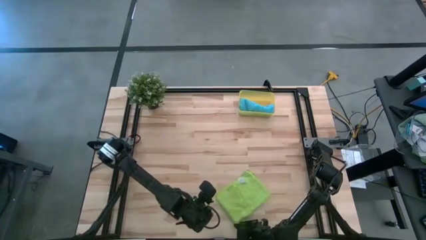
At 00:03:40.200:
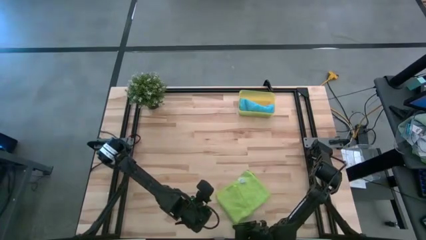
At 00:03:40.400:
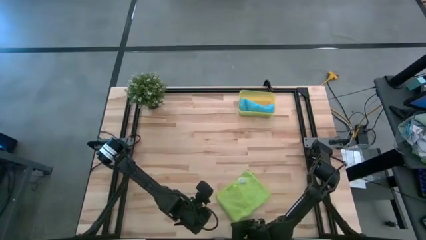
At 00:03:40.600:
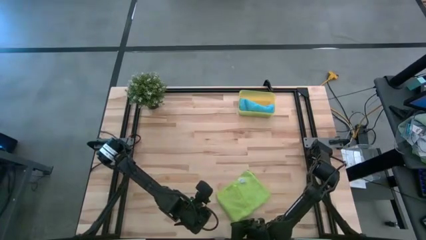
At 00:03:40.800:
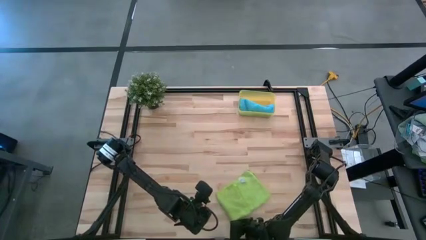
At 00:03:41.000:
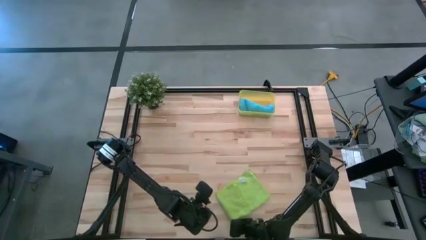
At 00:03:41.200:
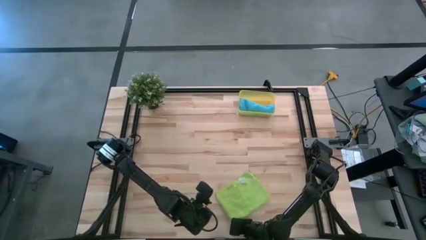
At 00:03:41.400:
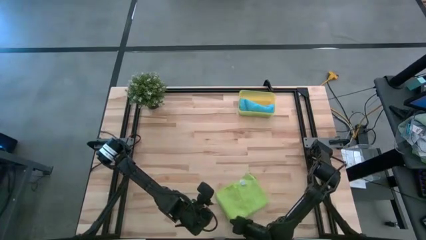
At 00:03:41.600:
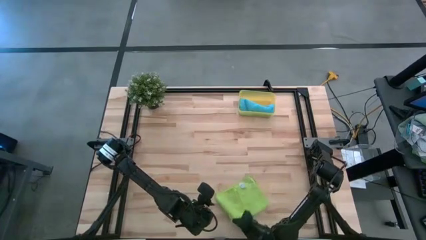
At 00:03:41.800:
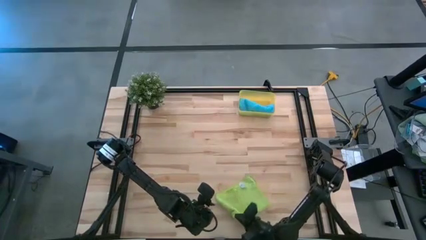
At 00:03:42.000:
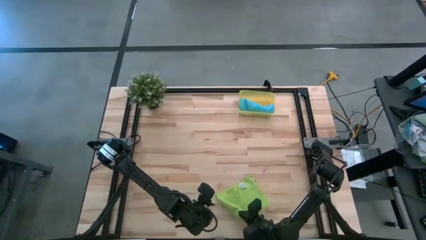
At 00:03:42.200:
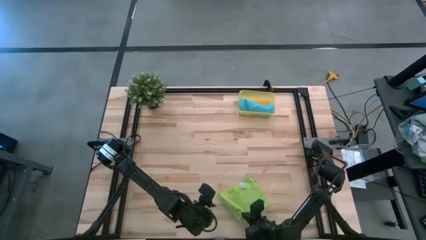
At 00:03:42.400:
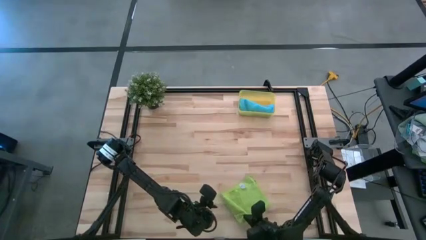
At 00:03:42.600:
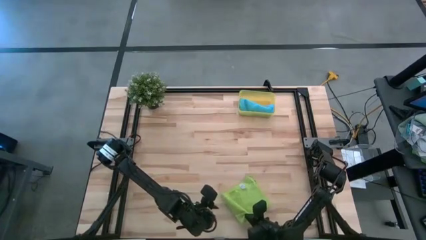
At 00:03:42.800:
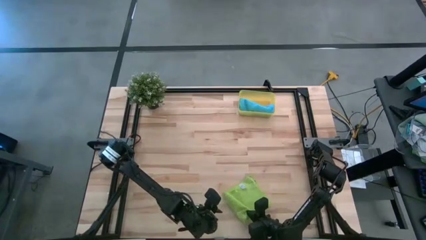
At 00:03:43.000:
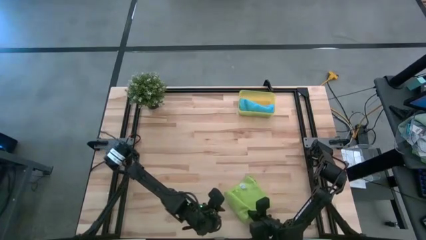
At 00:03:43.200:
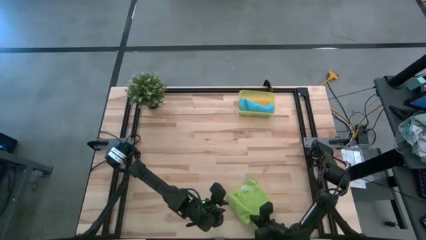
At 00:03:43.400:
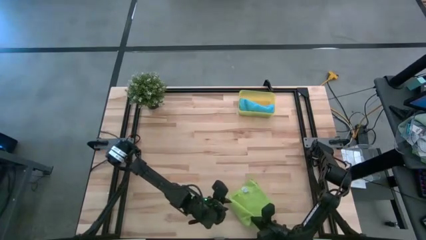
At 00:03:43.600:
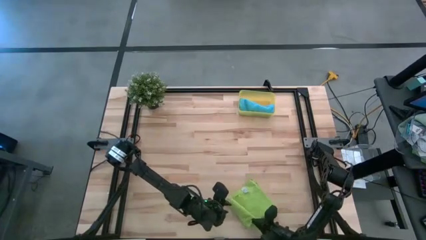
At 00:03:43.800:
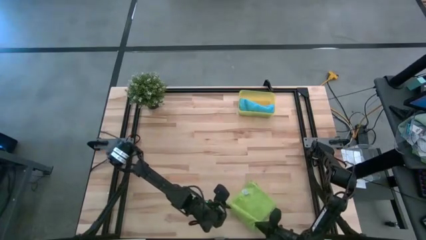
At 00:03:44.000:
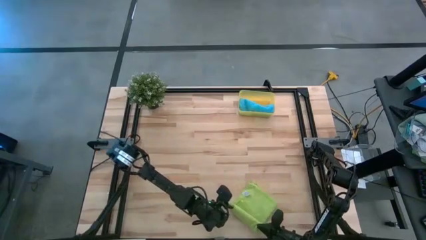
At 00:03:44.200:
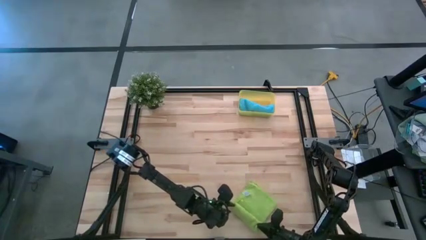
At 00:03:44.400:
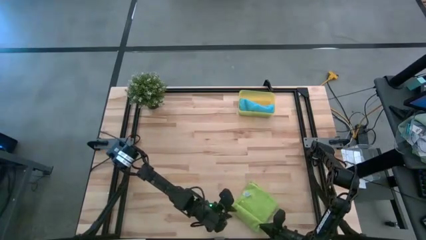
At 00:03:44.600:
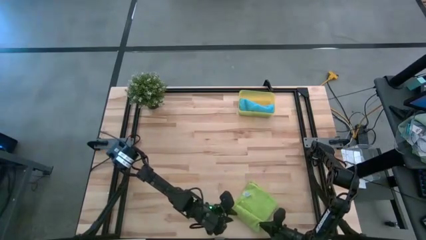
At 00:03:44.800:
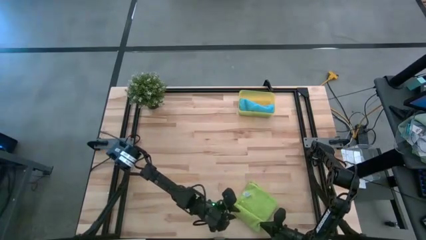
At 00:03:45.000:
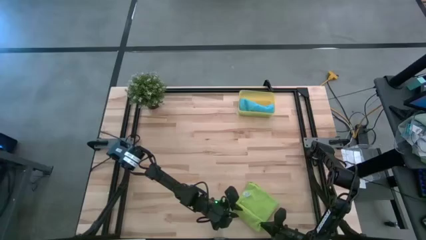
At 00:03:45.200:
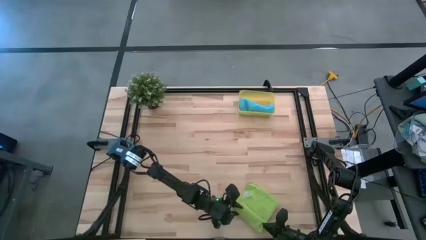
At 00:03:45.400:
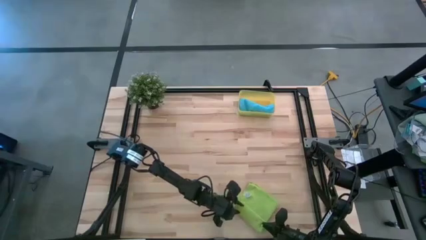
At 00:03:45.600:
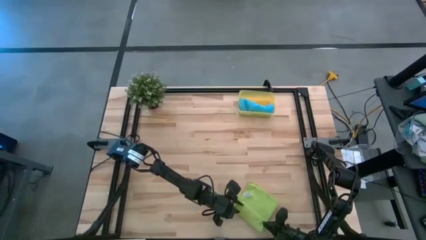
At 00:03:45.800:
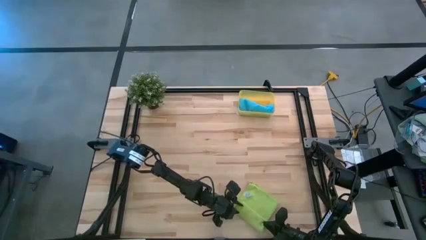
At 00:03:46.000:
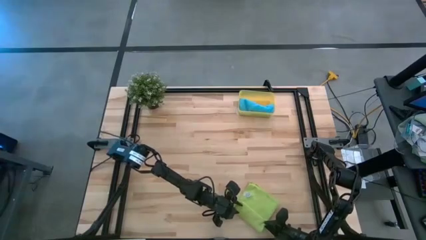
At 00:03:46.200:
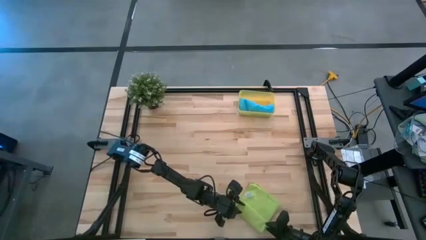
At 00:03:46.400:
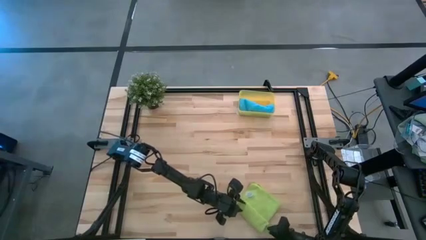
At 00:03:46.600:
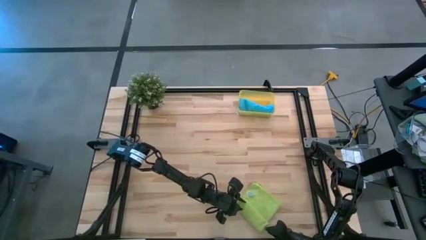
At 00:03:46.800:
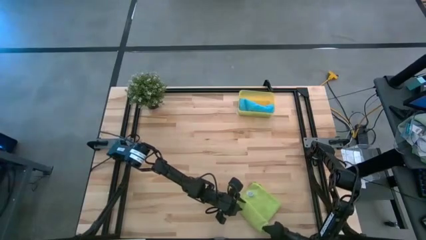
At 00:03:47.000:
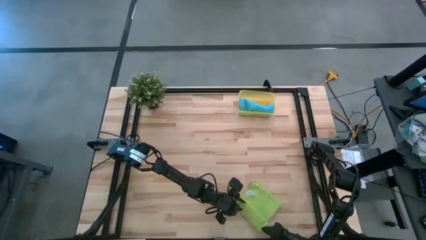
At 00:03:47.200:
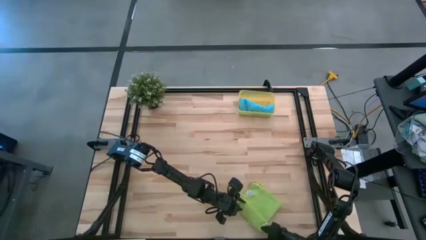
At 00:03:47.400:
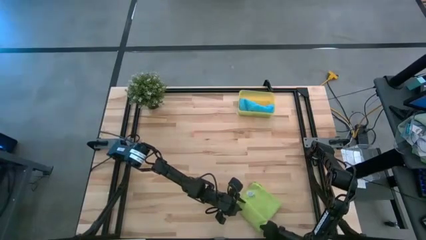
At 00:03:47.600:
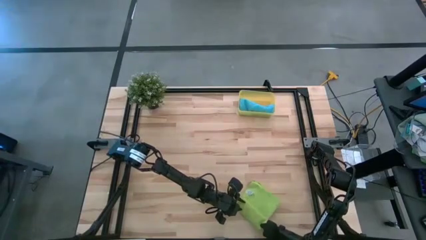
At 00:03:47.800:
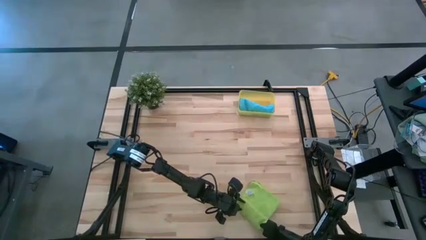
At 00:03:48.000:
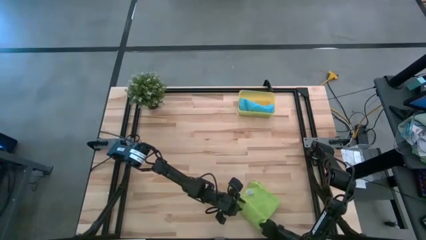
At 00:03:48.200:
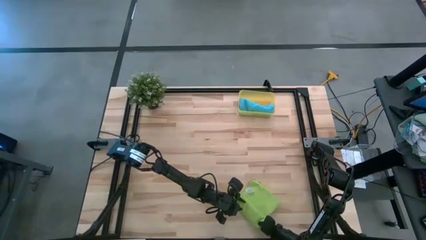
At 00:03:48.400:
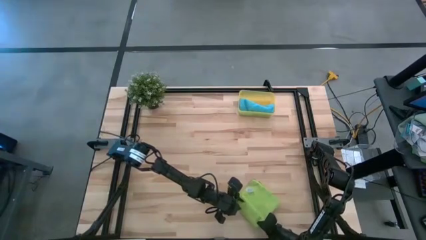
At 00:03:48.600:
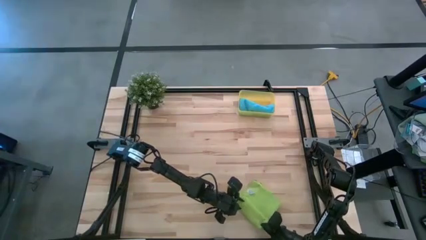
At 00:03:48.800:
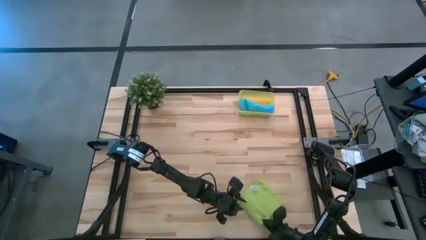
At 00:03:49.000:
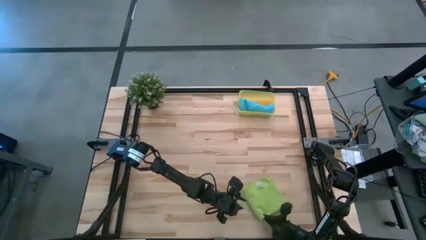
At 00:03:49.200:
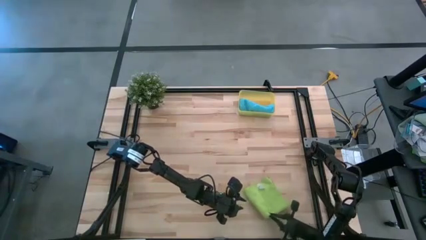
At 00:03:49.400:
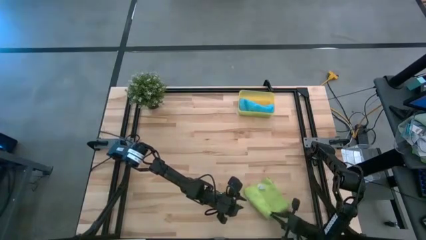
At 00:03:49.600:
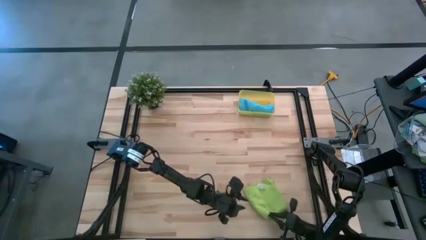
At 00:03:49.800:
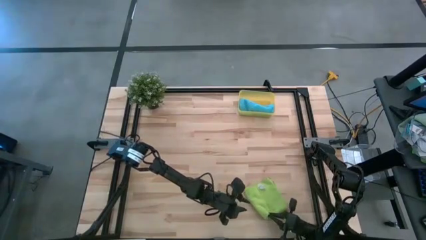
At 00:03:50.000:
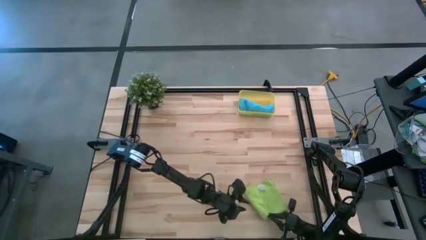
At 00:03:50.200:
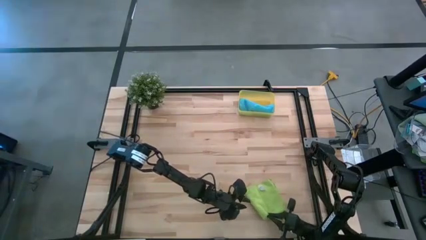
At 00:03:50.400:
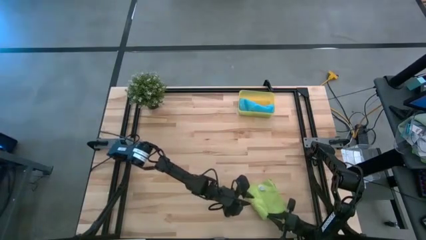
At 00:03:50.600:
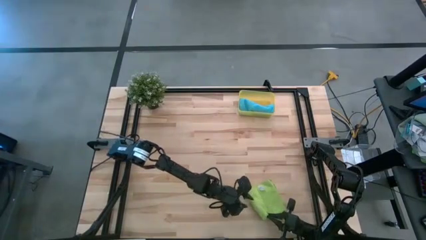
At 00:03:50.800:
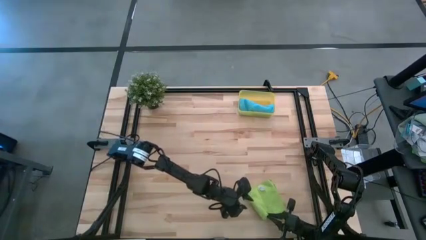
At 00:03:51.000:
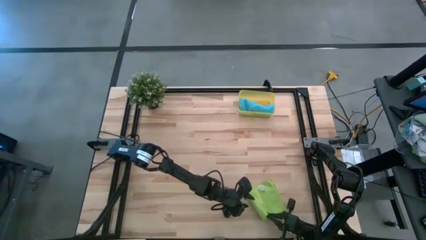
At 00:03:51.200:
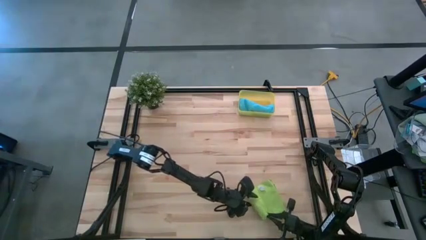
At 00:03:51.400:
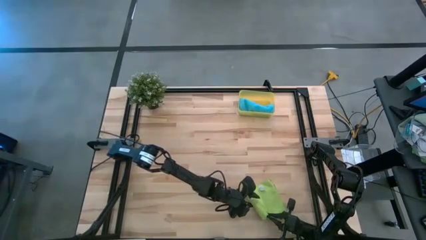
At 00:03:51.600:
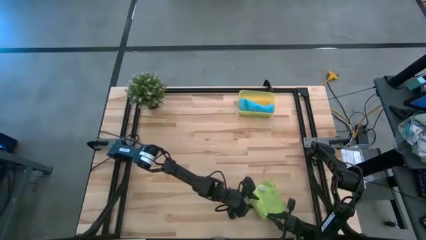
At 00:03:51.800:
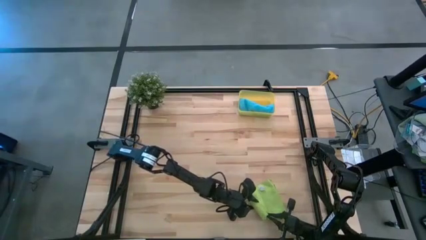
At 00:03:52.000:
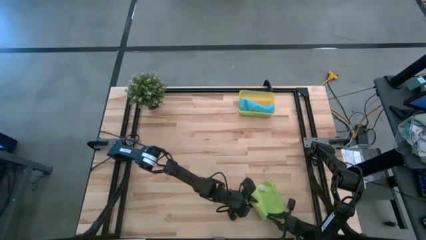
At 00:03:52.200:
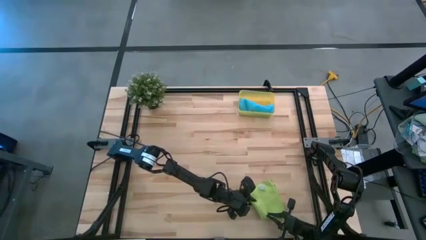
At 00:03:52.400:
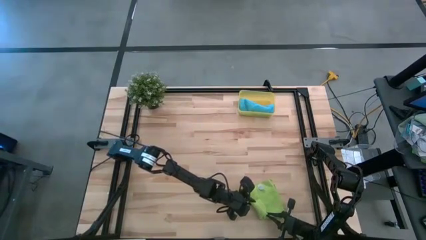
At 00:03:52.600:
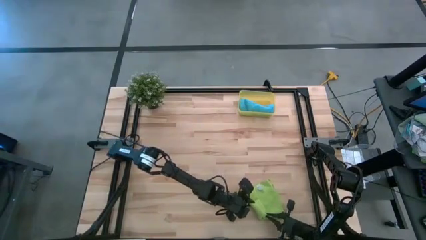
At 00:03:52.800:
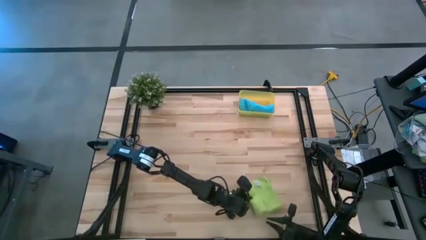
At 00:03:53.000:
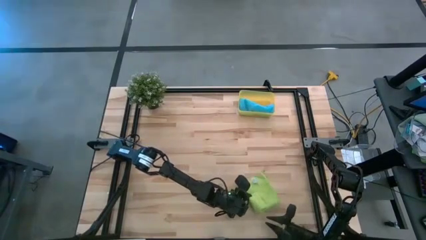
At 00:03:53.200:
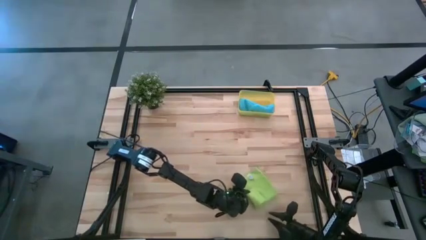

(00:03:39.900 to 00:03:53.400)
Task: Roll microfiber towels into tight, uniform cylinder then place into a basket
Roll the green microfiber towel
